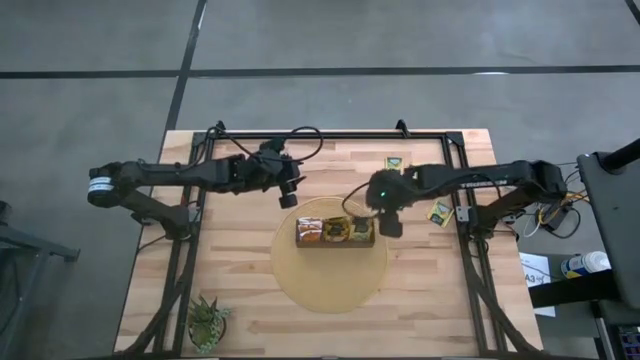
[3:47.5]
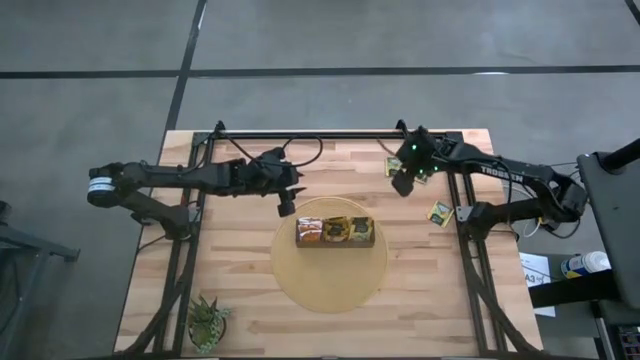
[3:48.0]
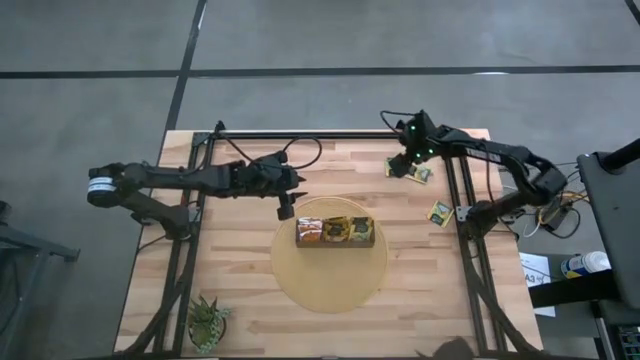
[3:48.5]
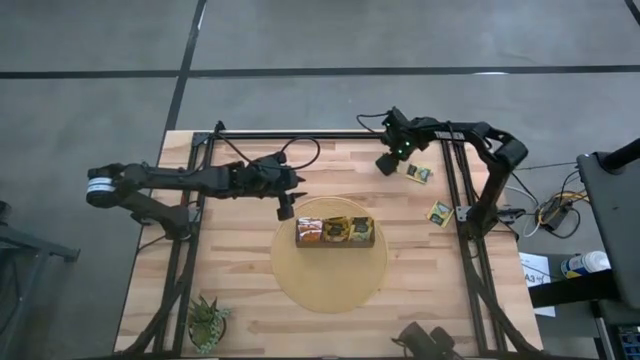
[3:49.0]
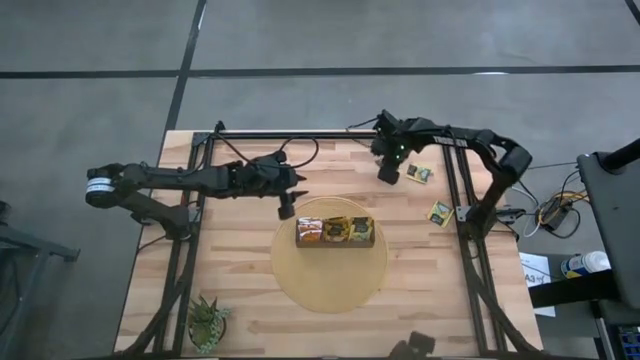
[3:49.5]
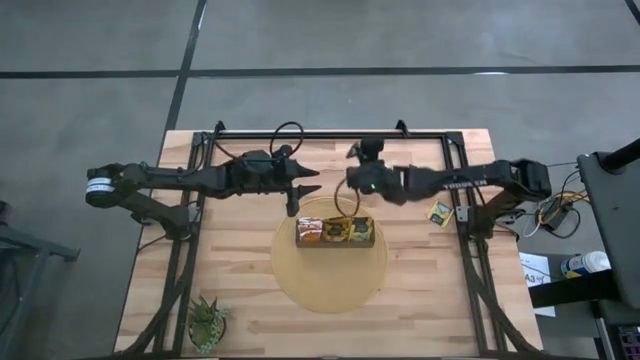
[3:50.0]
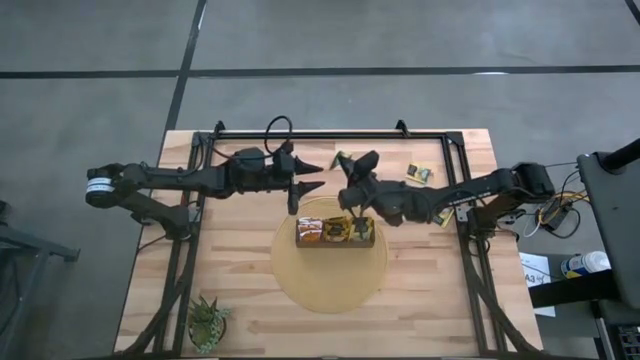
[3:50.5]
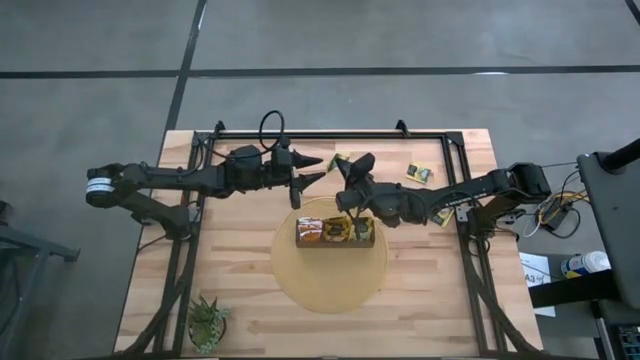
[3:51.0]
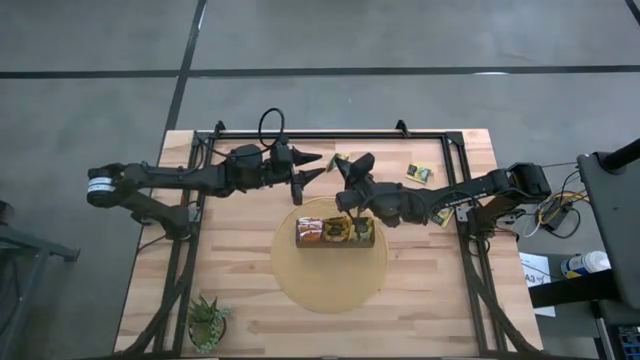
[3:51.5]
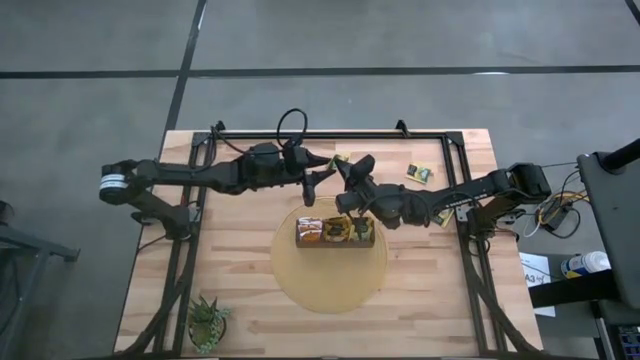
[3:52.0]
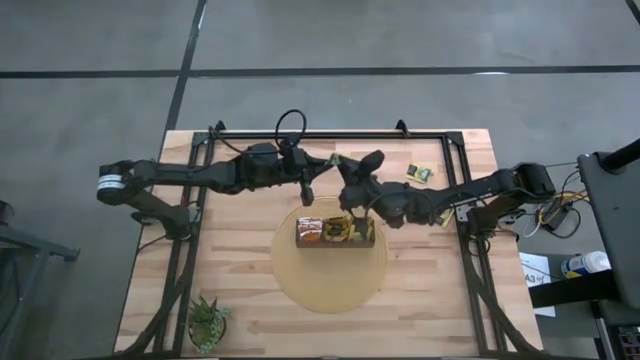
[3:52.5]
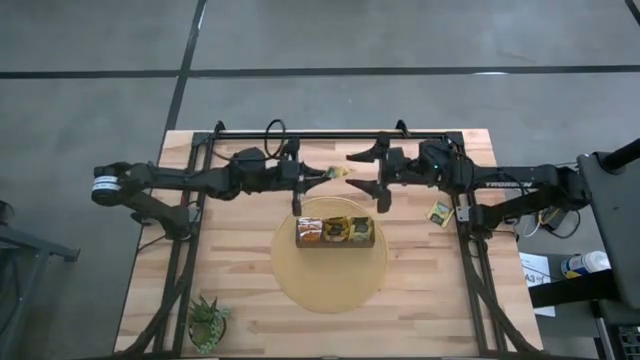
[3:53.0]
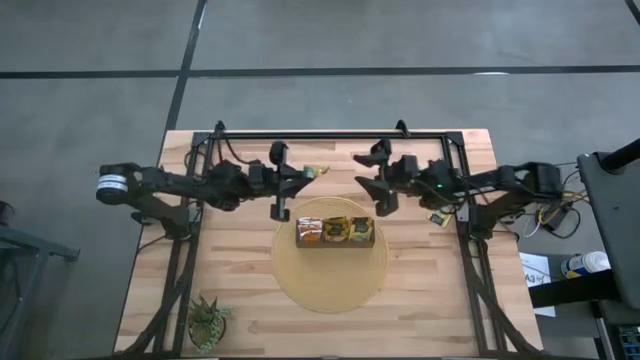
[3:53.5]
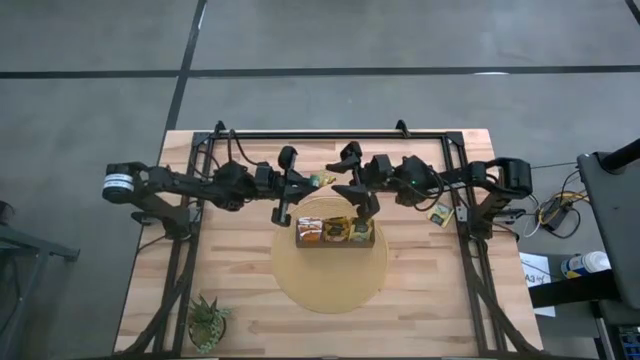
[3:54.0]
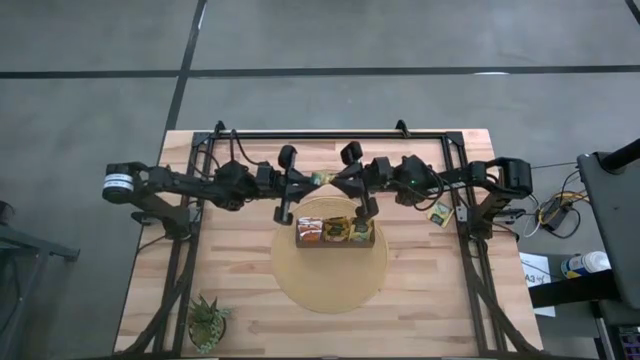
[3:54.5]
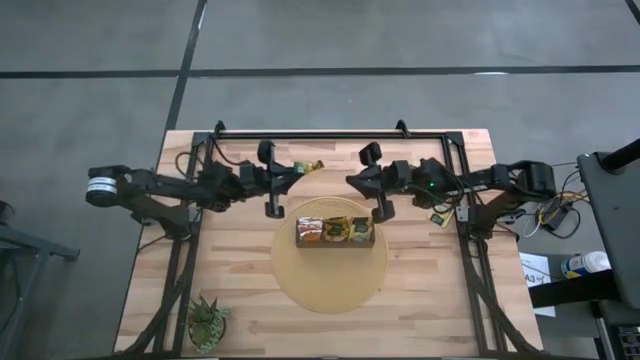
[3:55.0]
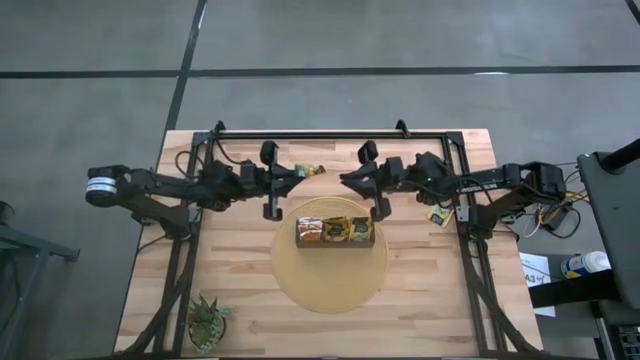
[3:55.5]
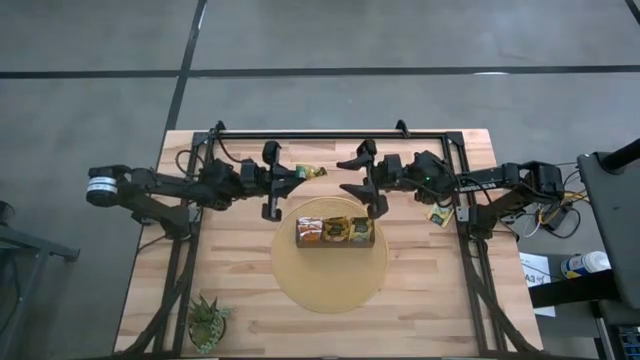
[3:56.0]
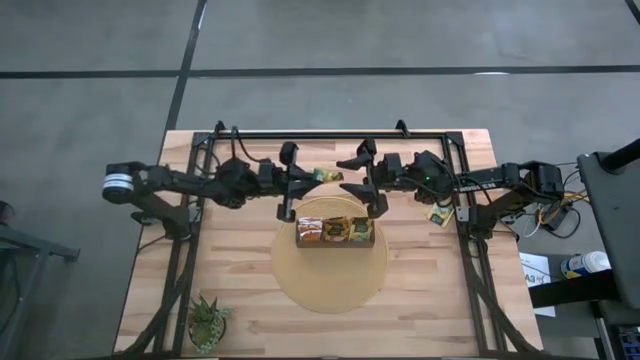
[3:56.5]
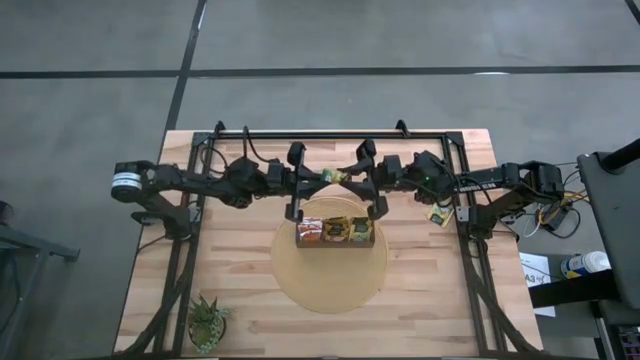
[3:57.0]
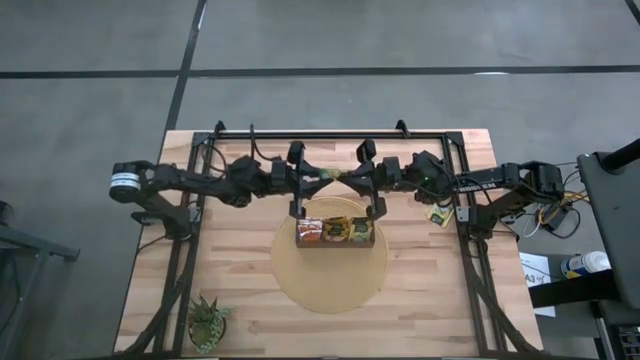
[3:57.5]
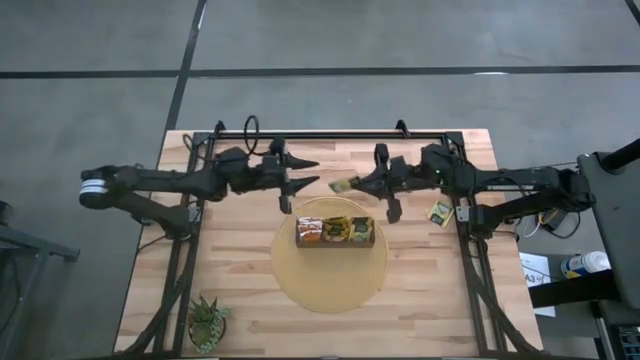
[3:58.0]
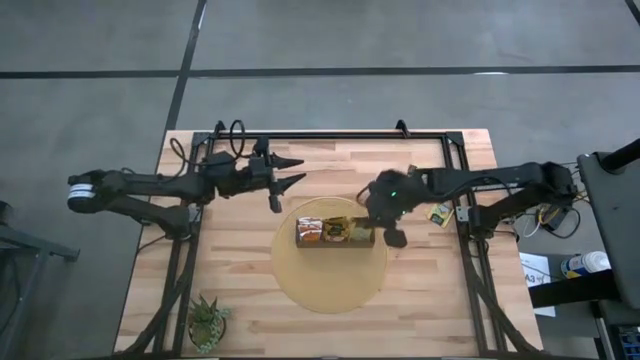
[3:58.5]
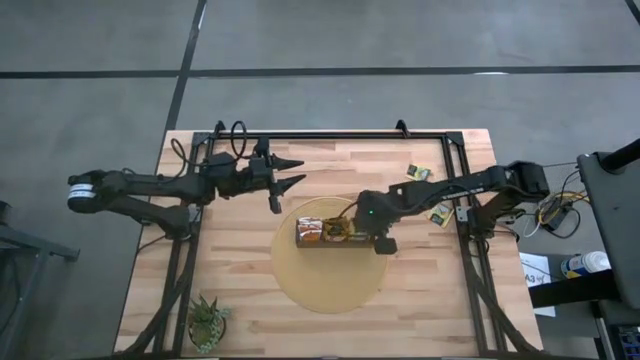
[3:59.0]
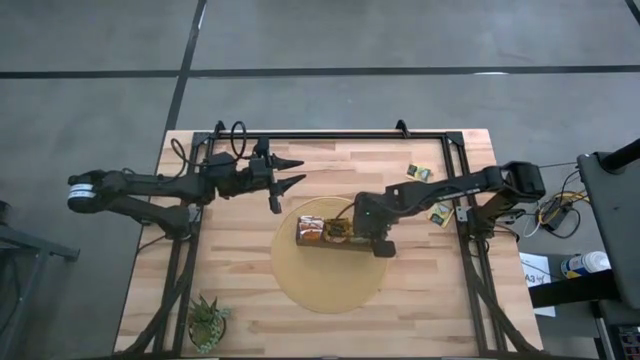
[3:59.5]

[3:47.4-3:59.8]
Task: Pick & Place Tea
Put the yellow tea bag into the right section of the wooden organizer

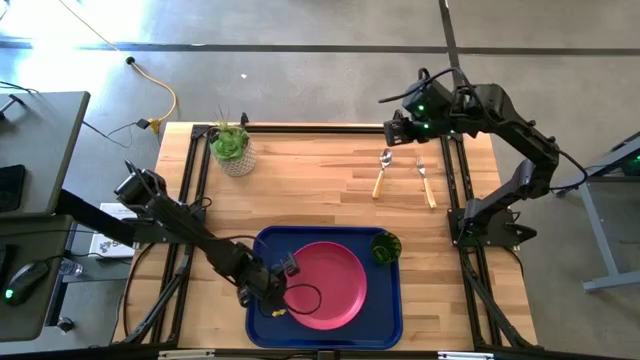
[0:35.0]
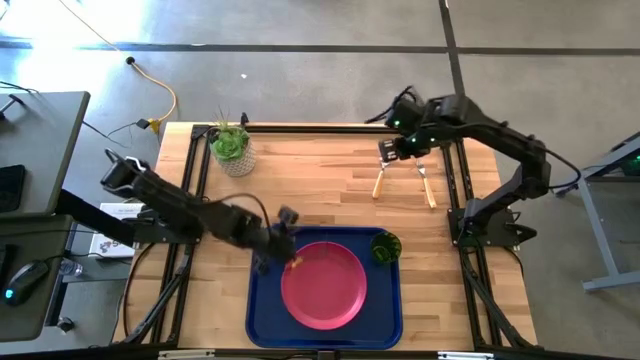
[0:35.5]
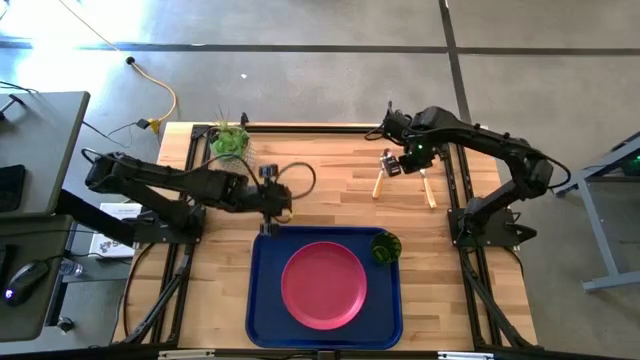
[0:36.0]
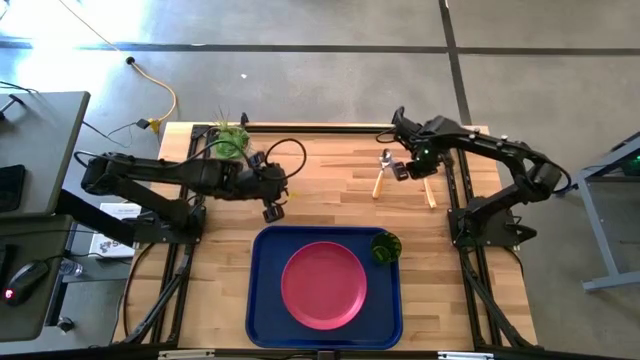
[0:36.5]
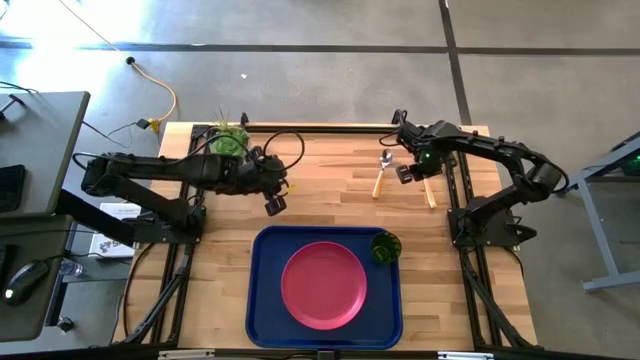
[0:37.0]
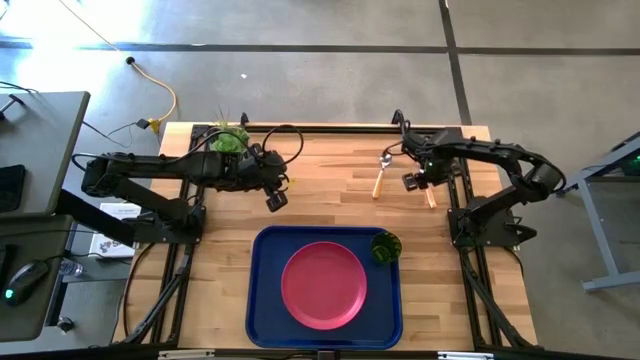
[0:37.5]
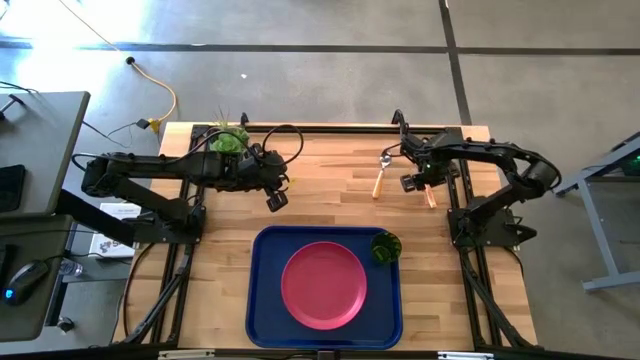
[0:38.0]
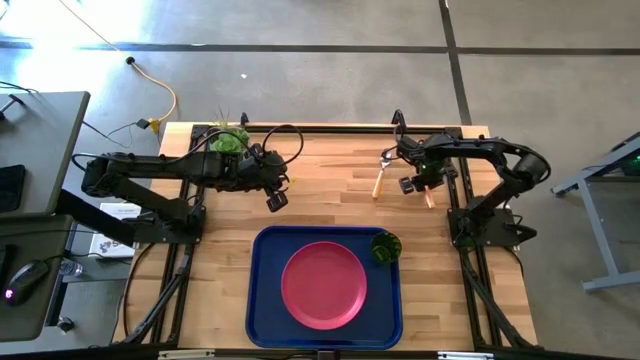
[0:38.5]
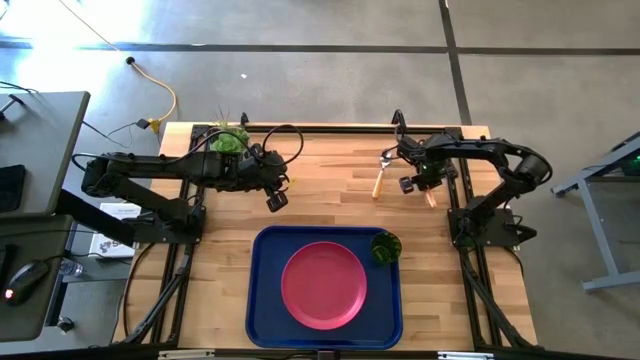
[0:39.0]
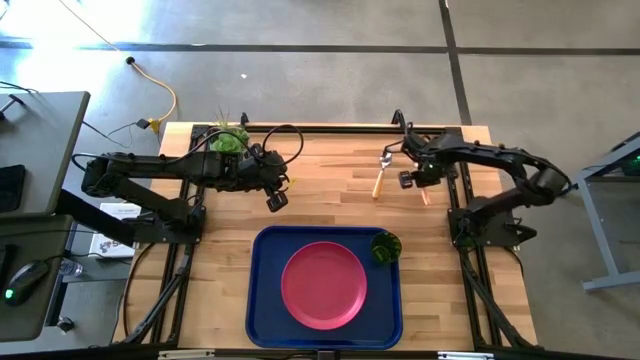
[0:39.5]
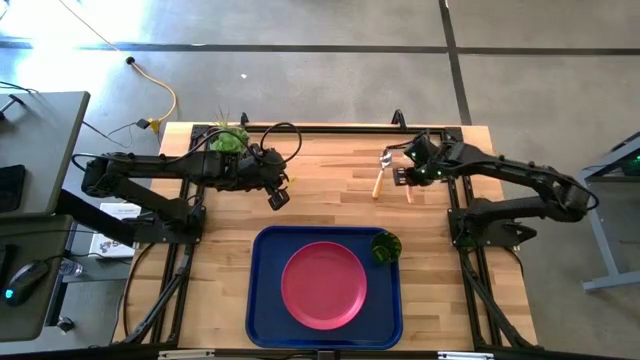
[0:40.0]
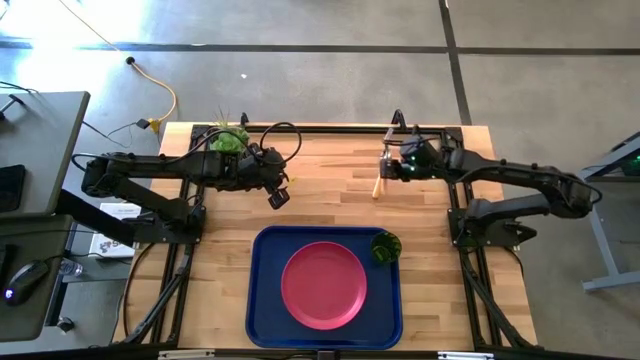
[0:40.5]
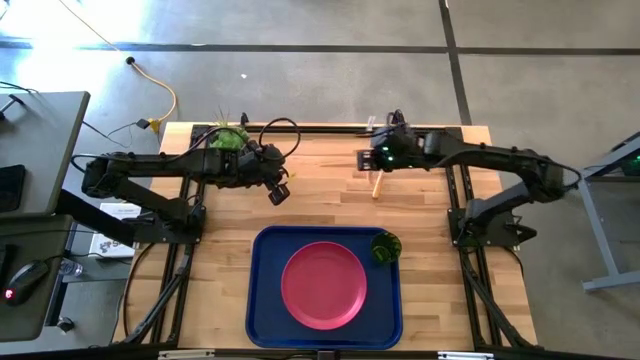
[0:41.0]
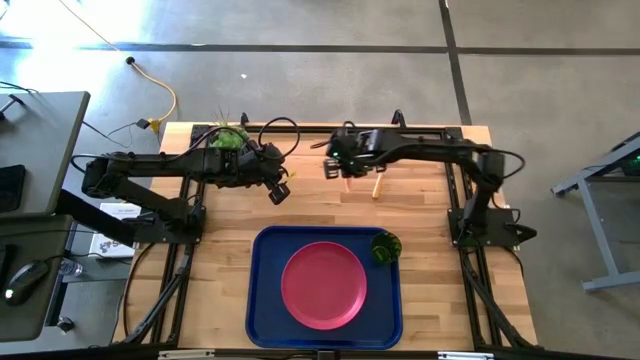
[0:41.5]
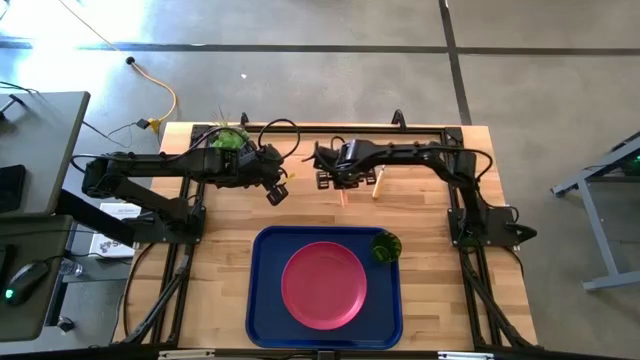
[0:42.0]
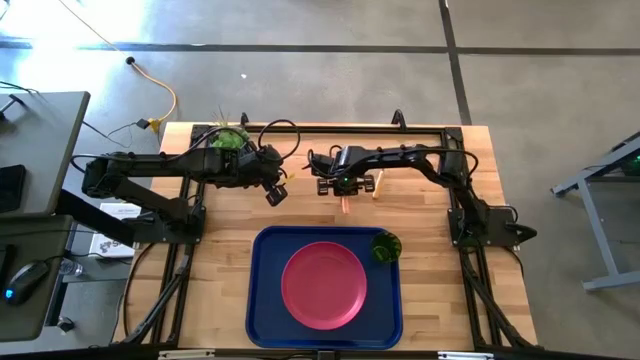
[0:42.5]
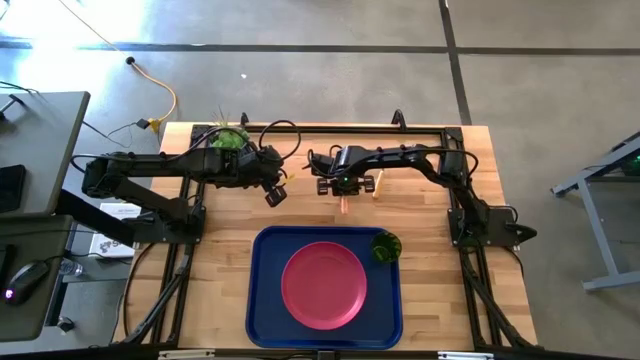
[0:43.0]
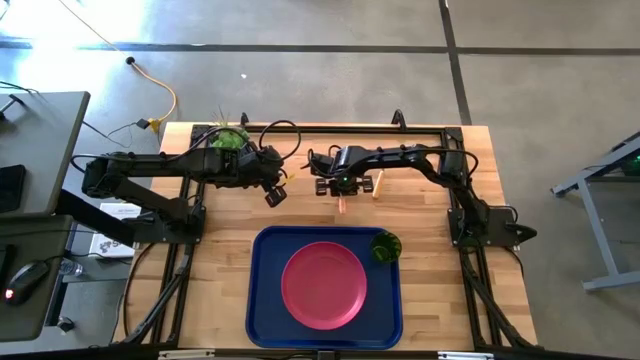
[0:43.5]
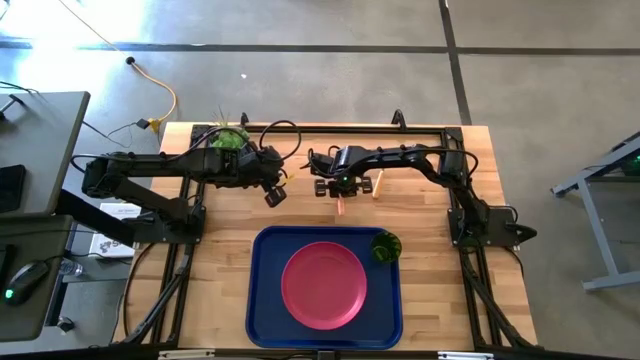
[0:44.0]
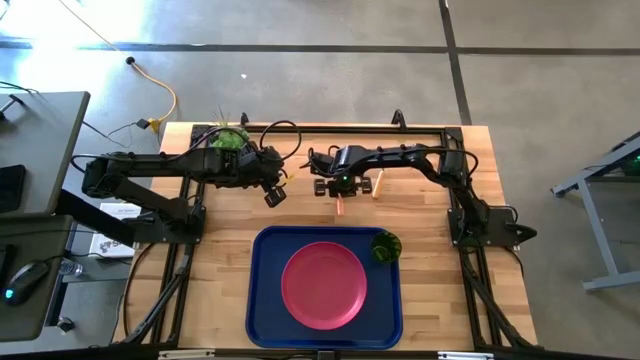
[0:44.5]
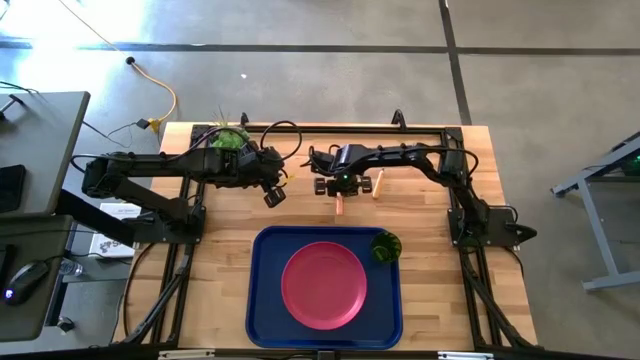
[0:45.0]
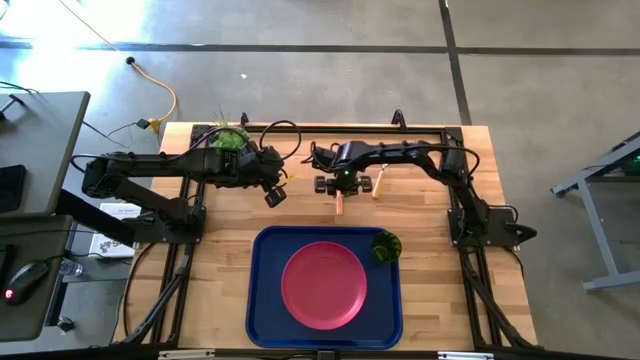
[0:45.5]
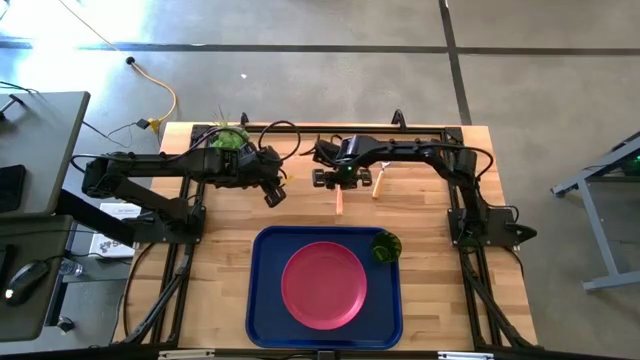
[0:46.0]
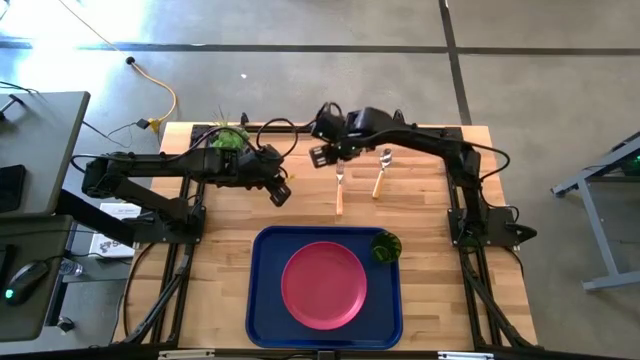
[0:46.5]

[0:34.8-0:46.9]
Task: Pick and place plate/cup/fork/spoon on tray
Put the yellow fork on the blue tray to the left side of the pink plate
